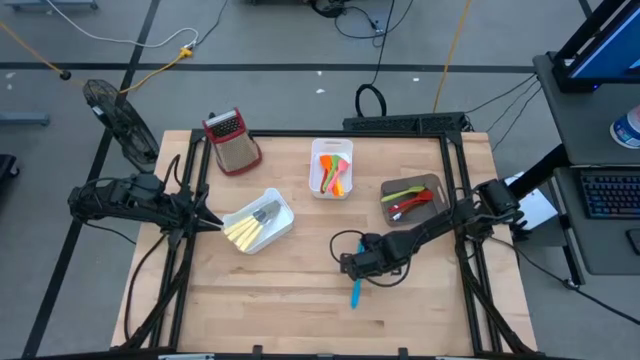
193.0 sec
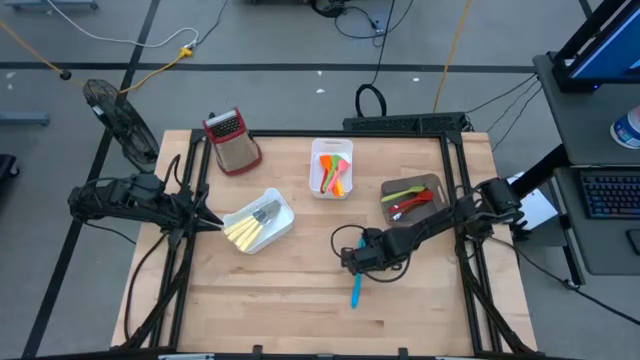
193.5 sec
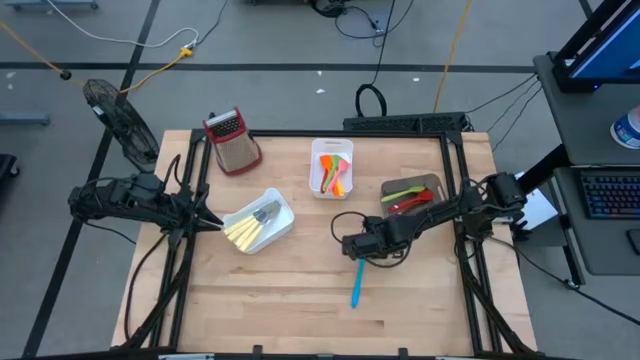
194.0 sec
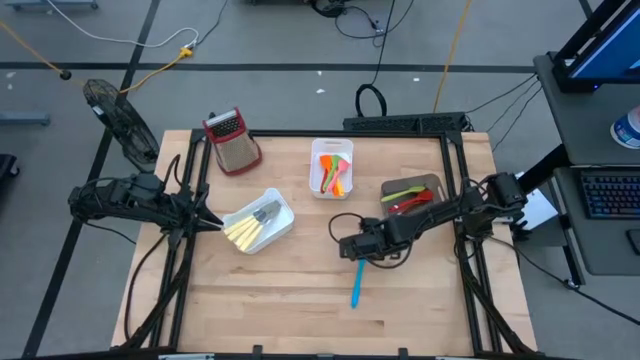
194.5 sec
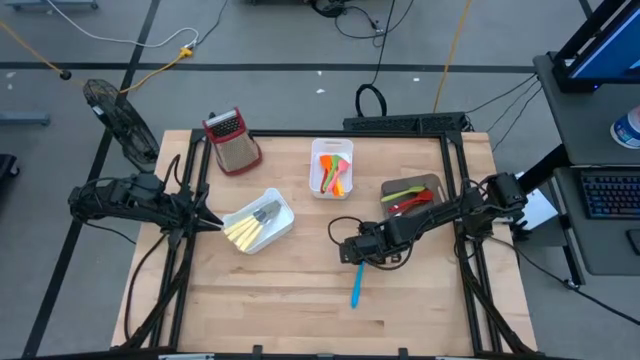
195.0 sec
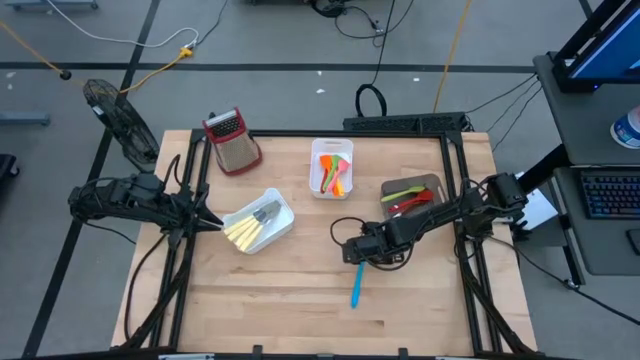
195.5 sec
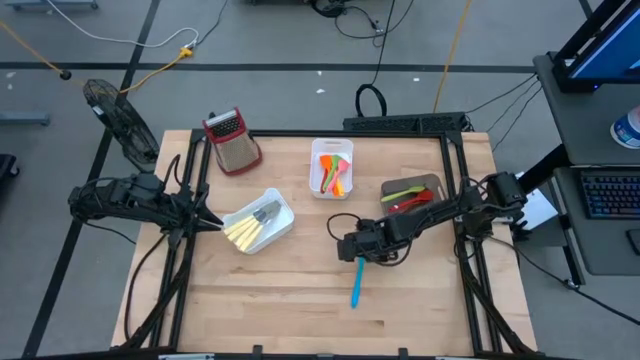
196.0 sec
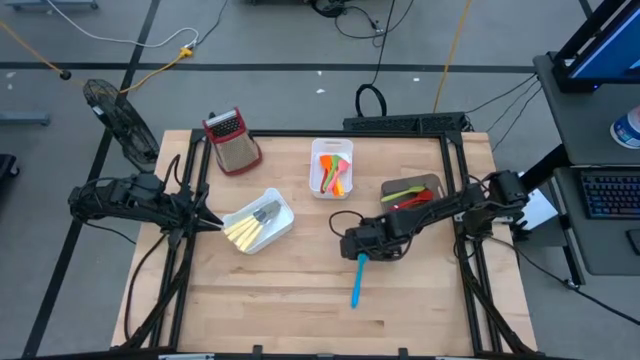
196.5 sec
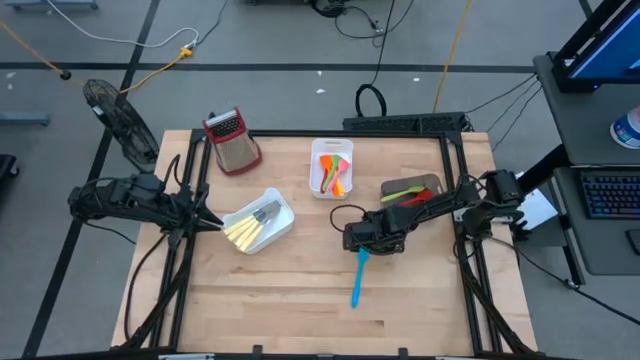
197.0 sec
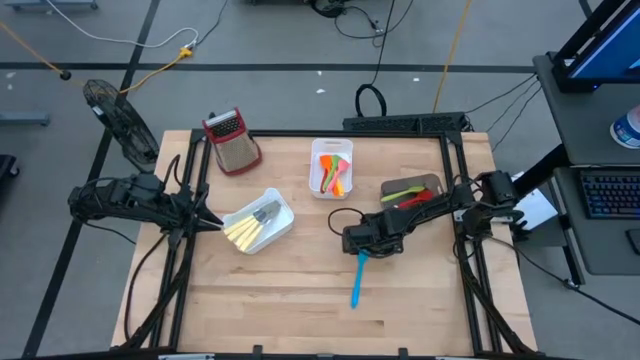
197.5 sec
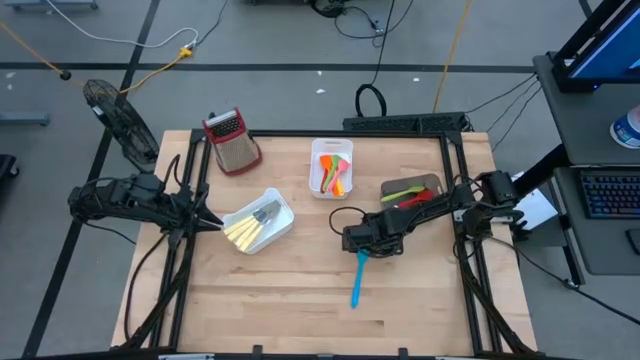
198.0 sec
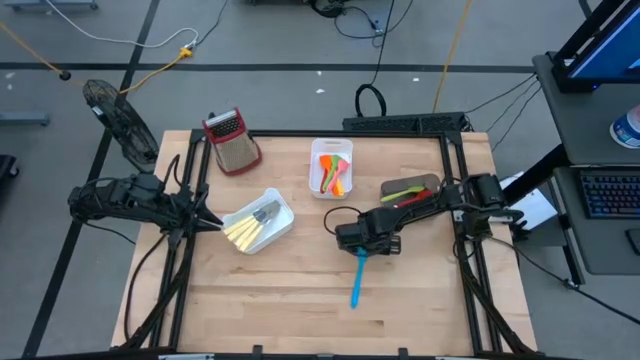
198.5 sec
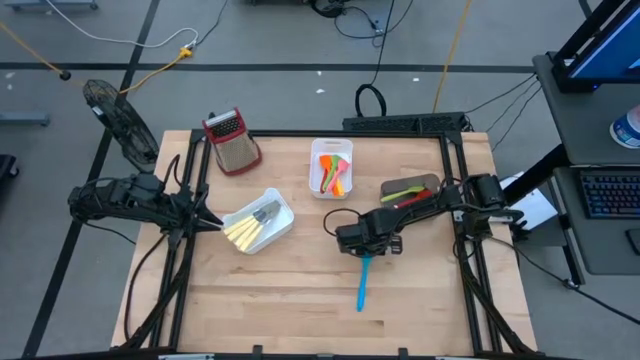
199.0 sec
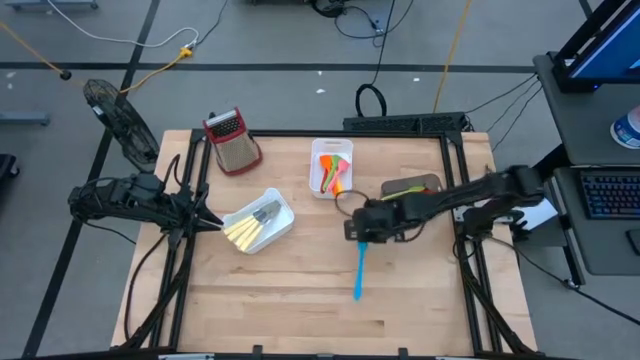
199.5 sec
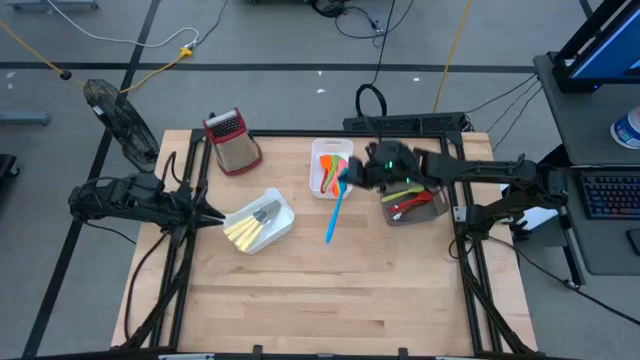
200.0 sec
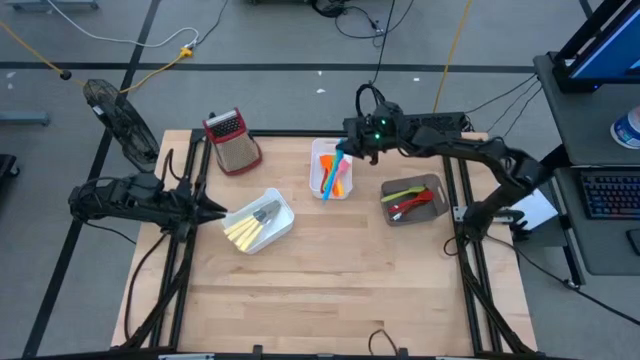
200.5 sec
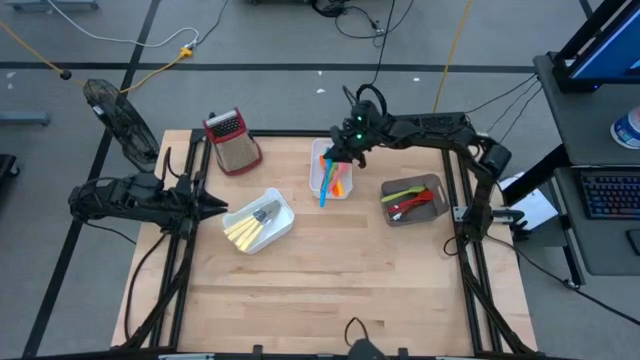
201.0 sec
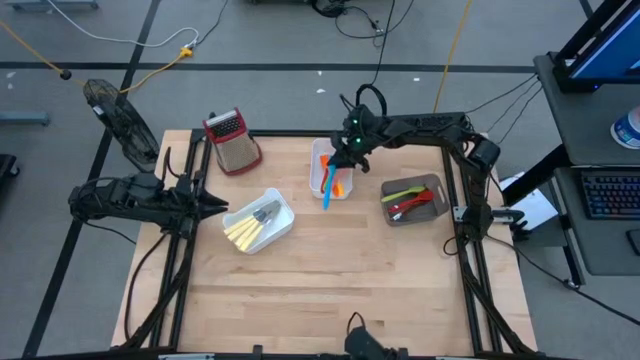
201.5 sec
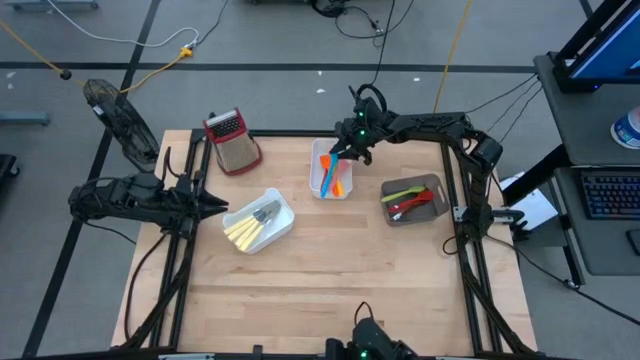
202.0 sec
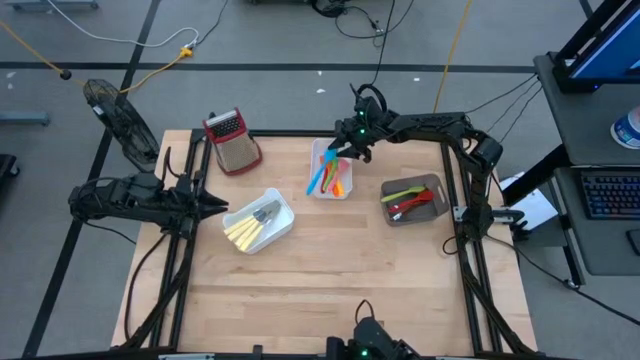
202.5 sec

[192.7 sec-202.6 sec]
Task: Pick & Place Kitchen Items
Put the blue spatula into the top white bin

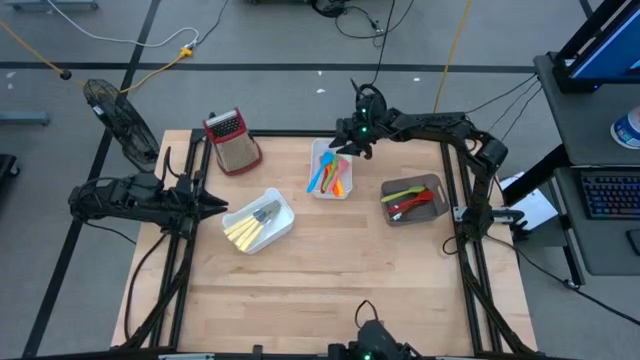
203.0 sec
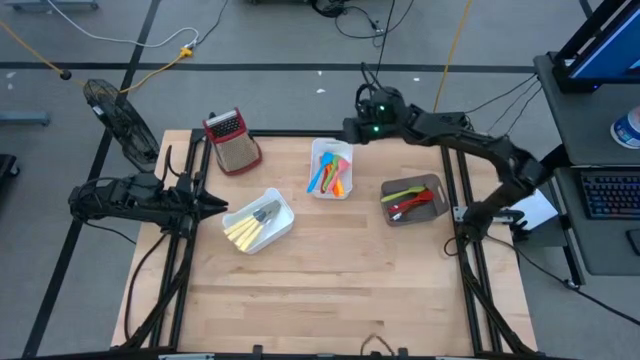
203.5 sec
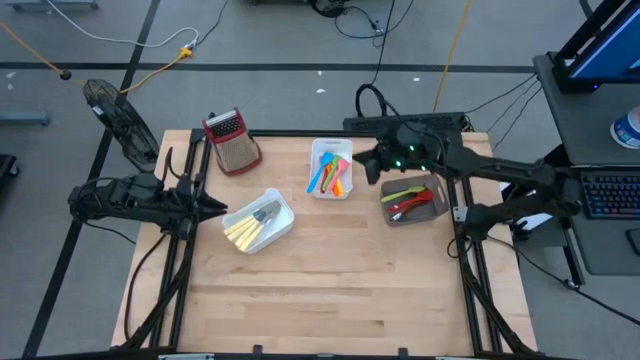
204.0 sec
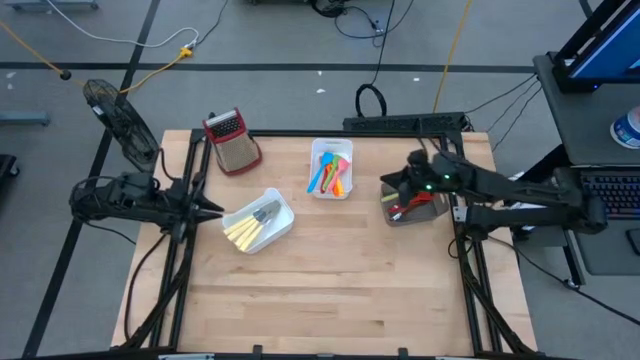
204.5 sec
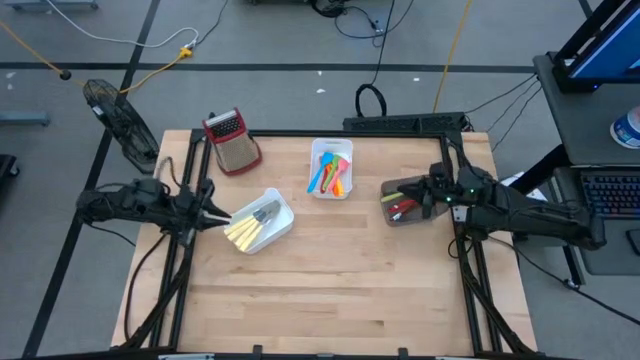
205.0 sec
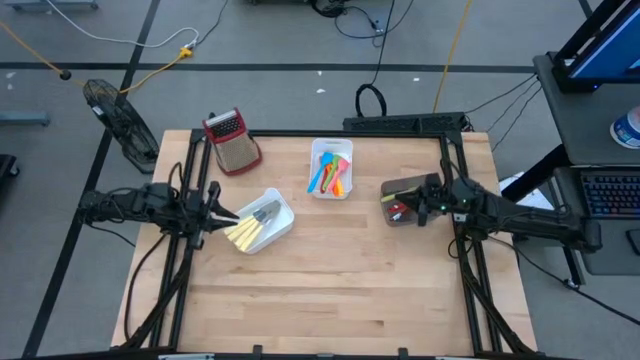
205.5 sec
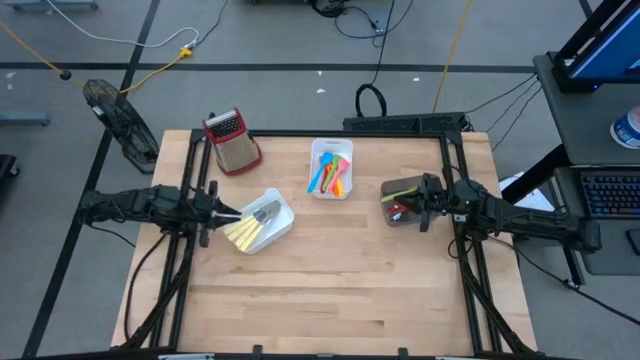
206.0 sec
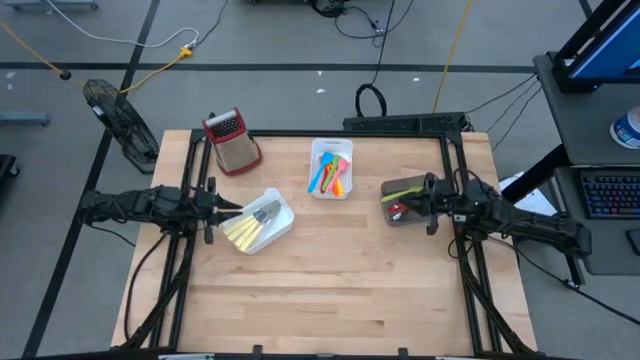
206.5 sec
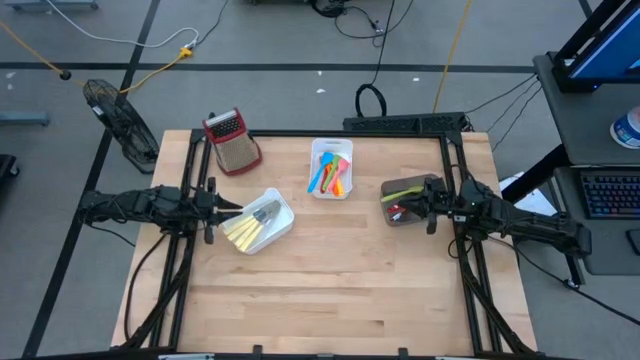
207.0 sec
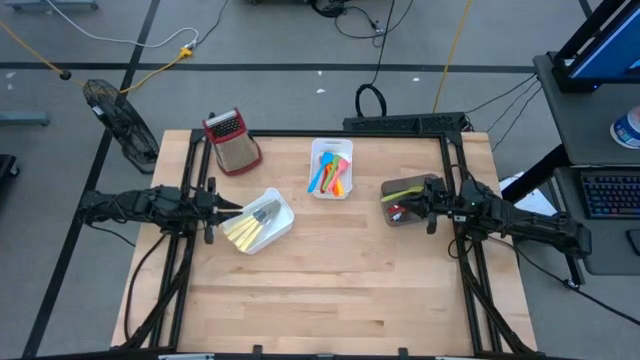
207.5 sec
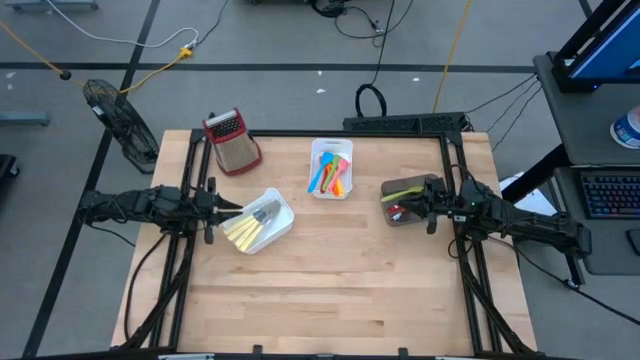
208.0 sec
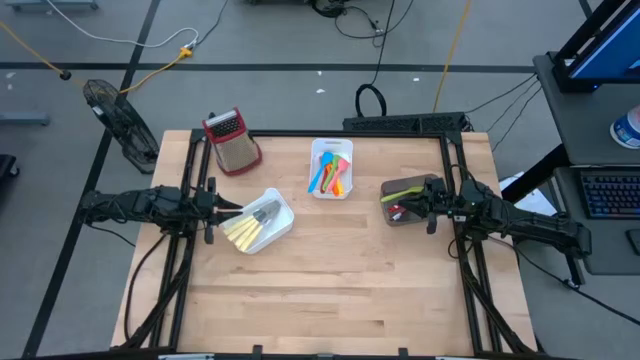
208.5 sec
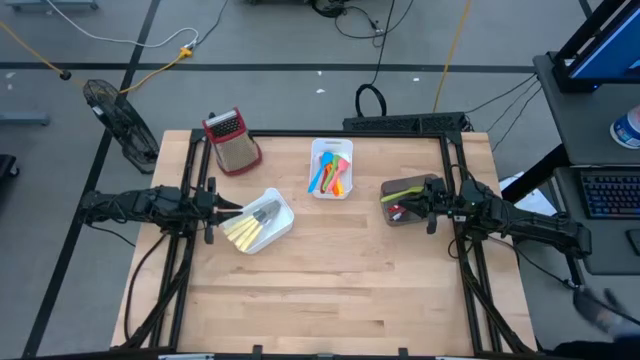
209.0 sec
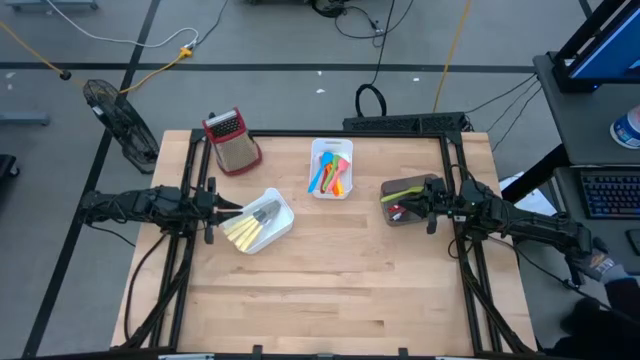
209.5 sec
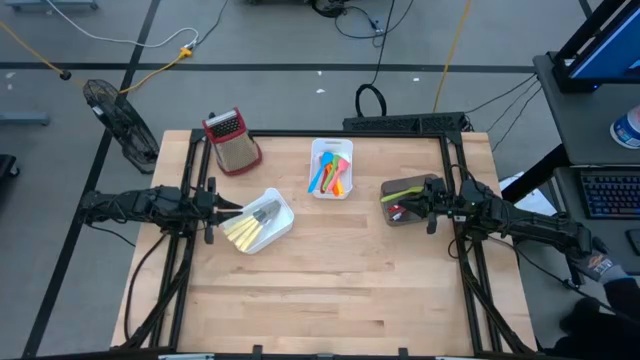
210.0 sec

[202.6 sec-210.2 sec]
Return to Home Position

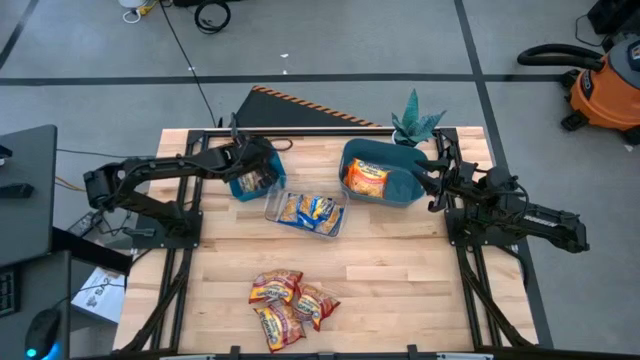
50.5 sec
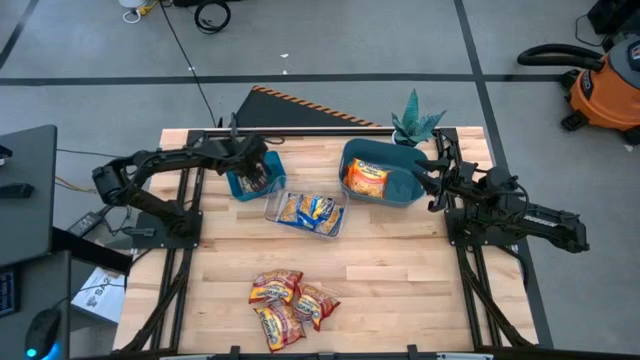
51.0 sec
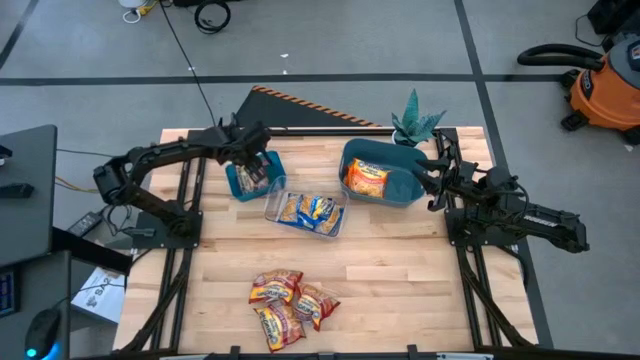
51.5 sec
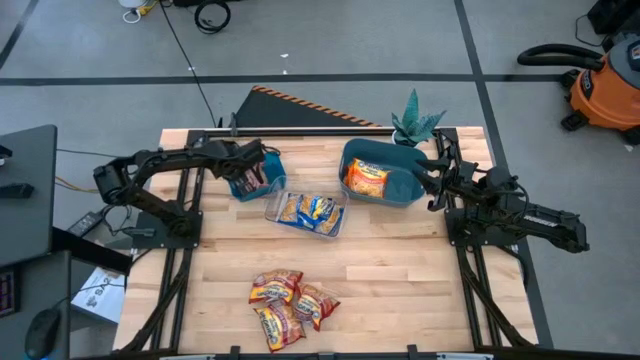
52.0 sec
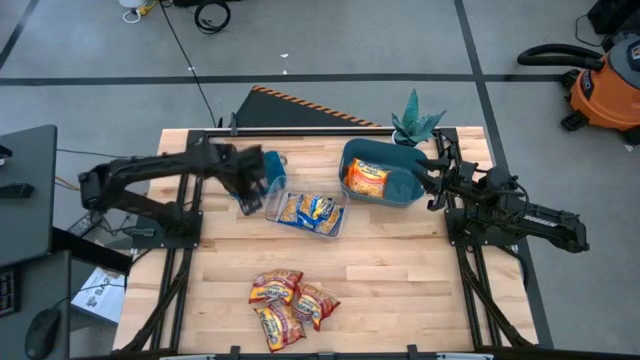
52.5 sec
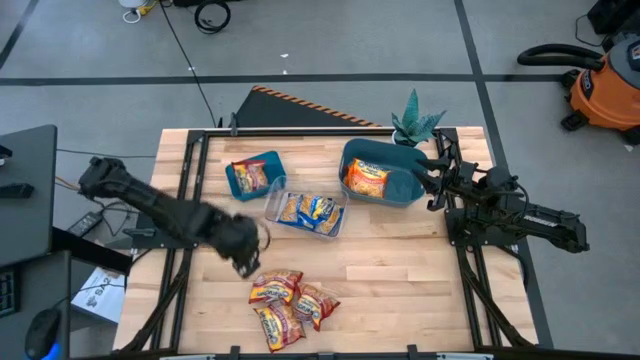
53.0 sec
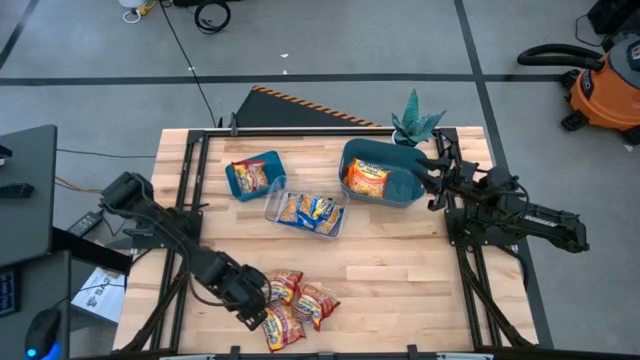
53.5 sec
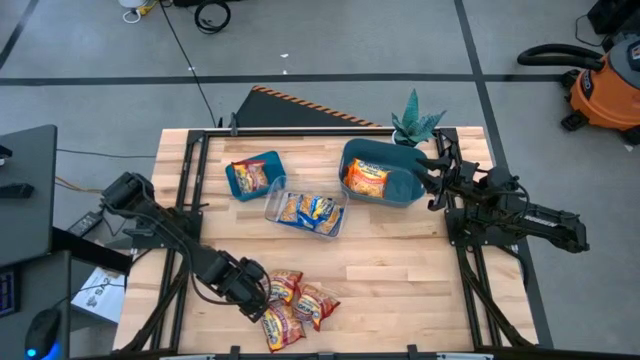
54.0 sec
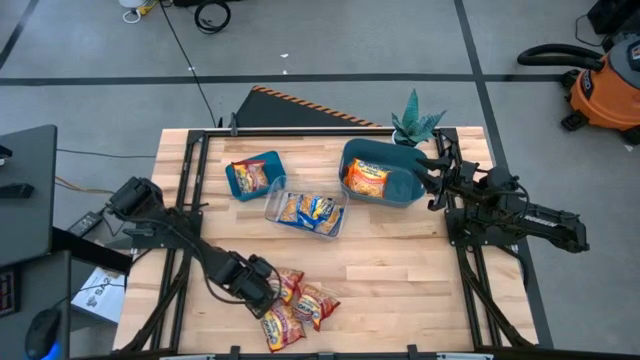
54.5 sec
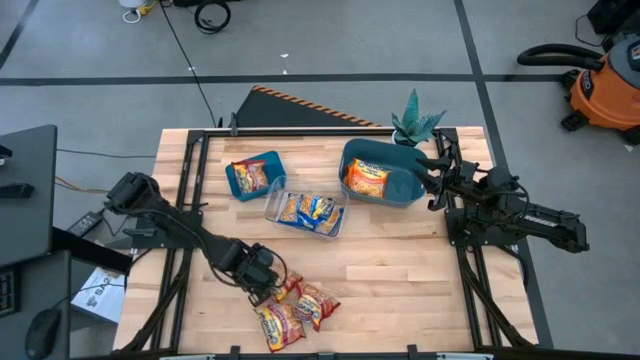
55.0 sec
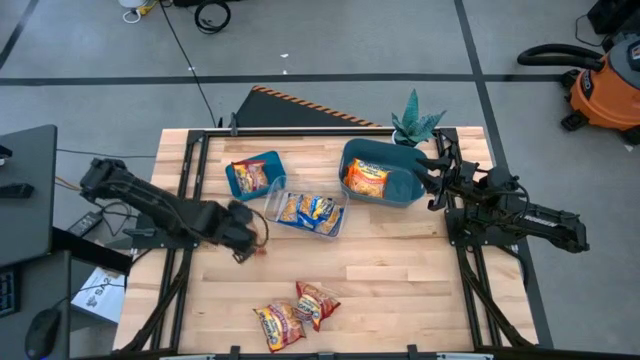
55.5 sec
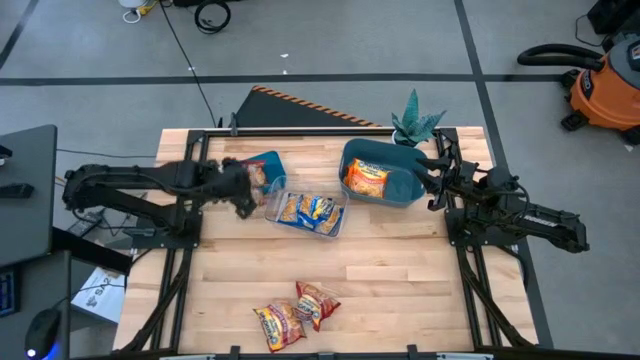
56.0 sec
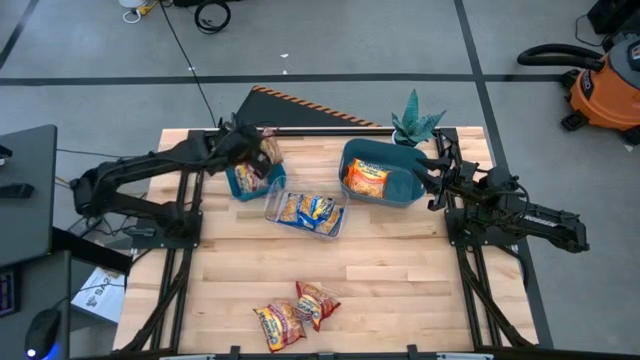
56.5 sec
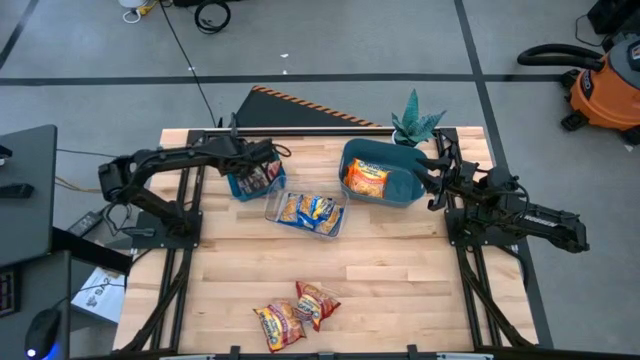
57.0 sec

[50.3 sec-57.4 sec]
Task: Sort Maruchan noodles
Put the red noodle pack into the left small blue bin
